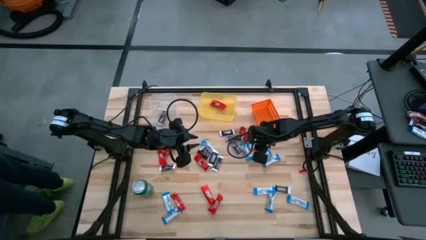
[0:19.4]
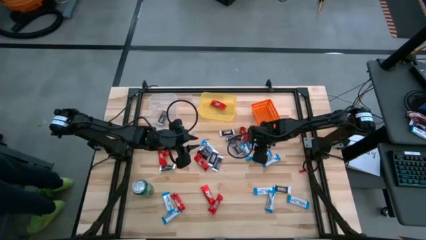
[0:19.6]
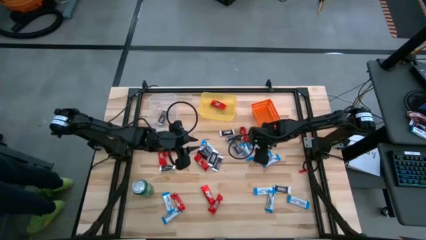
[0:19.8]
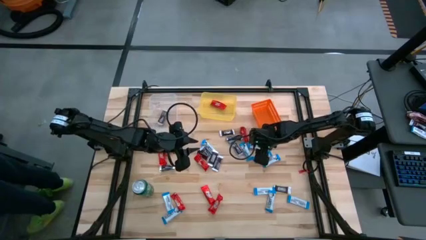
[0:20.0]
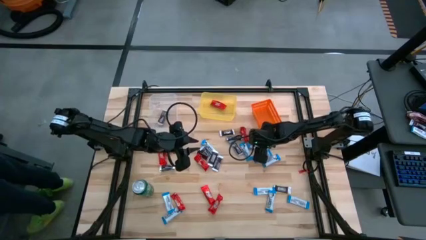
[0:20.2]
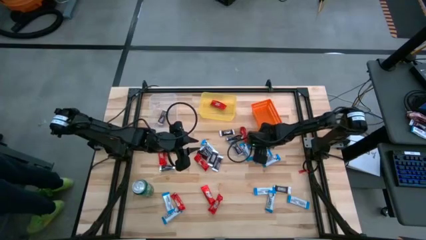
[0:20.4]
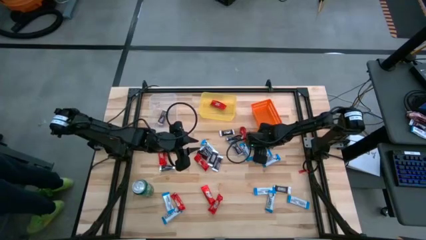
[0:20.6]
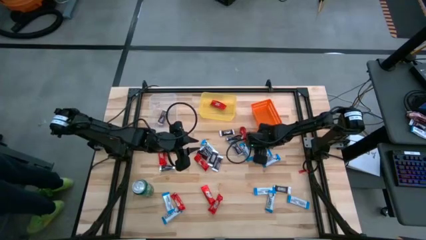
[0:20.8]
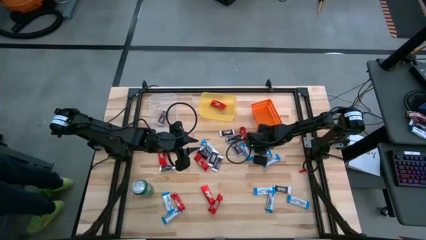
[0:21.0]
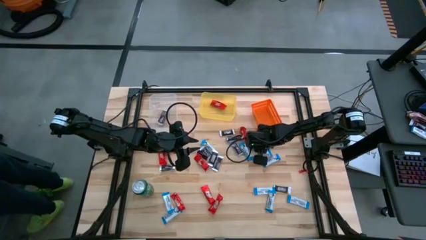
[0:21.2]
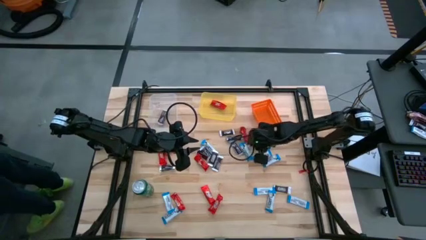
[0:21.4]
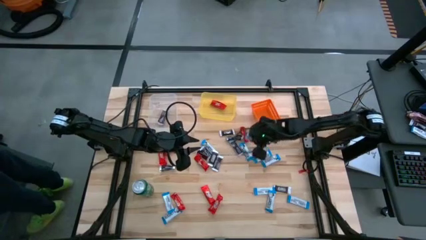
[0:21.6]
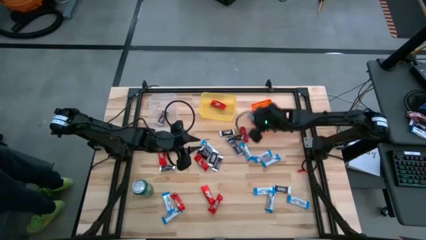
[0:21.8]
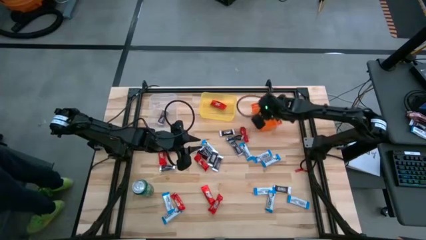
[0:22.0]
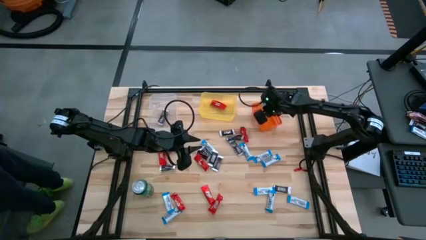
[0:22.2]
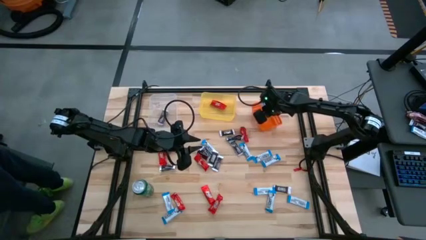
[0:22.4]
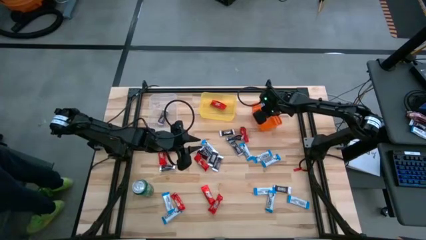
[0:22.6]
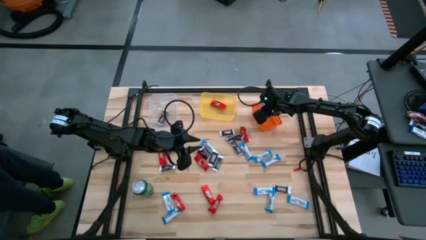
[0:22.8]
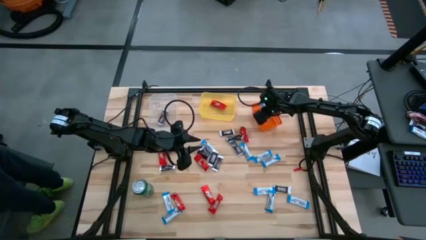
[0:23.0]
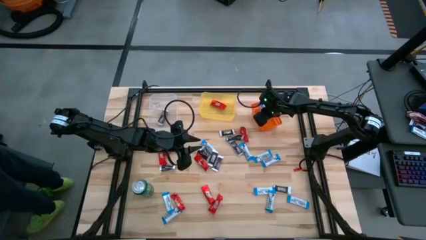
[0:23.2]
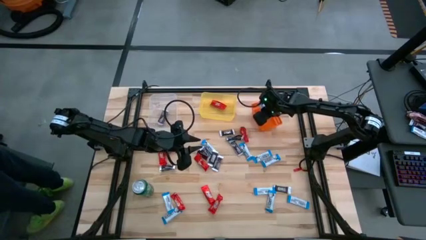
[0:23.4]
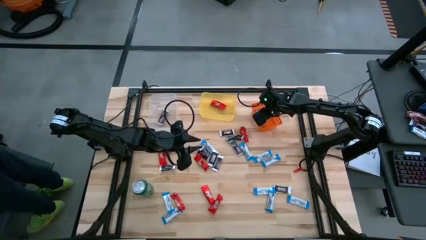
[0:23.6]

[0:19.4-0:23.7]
Task: Sort candy
Put the white chocolate bar into the orange bin

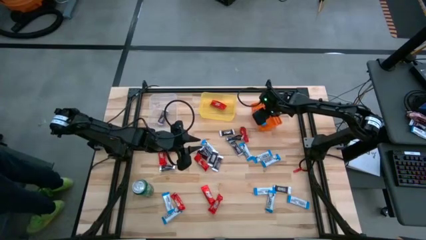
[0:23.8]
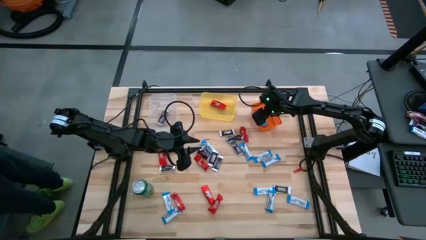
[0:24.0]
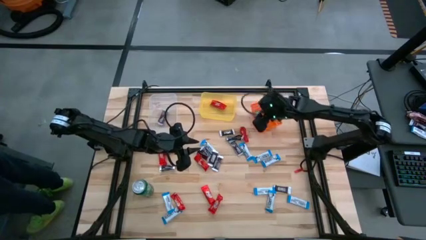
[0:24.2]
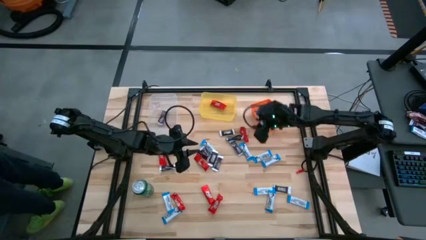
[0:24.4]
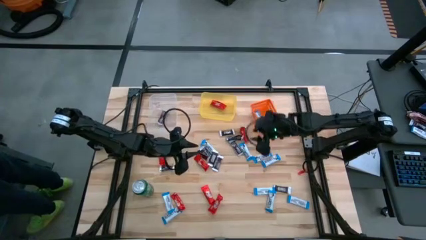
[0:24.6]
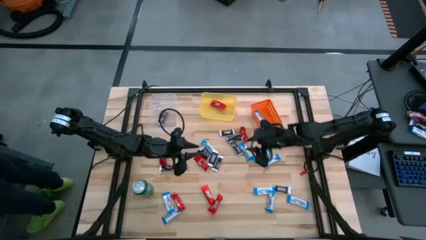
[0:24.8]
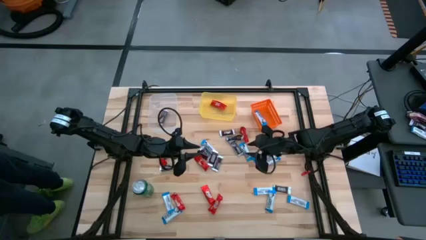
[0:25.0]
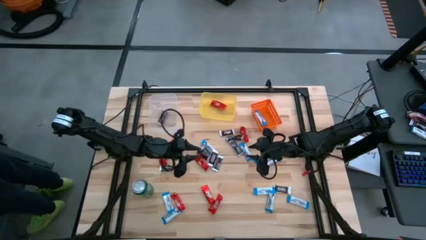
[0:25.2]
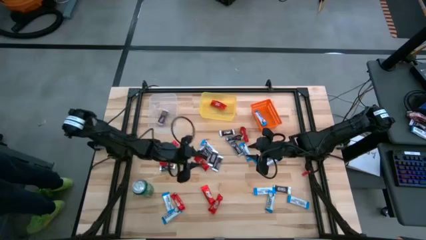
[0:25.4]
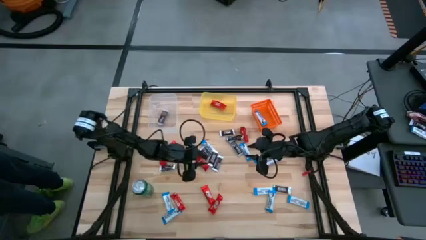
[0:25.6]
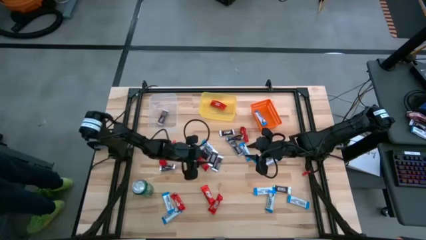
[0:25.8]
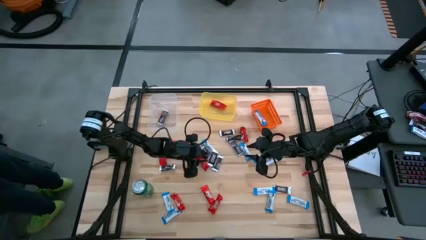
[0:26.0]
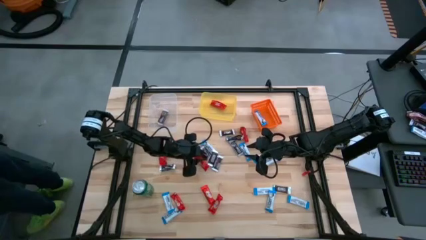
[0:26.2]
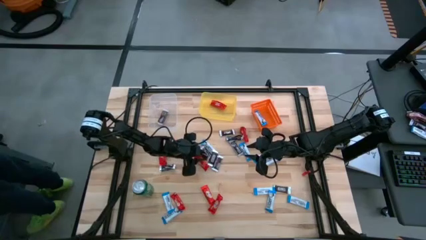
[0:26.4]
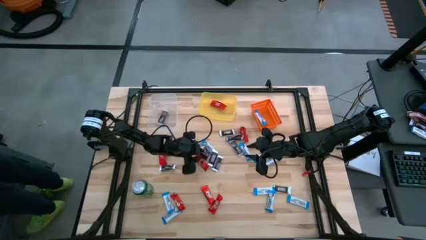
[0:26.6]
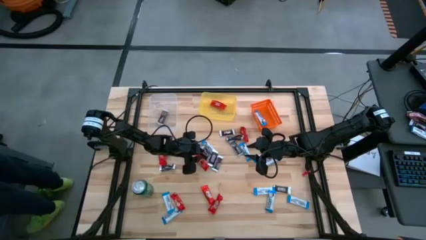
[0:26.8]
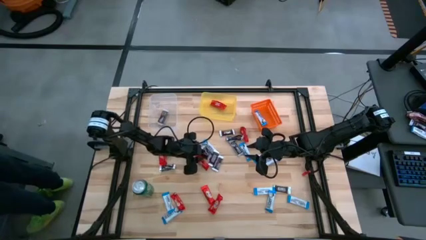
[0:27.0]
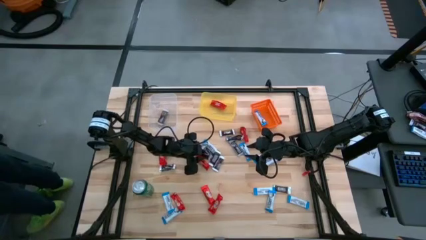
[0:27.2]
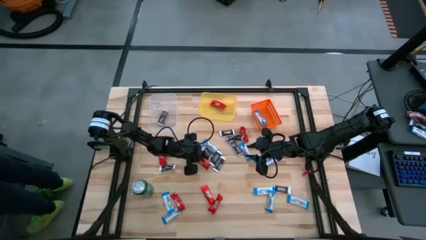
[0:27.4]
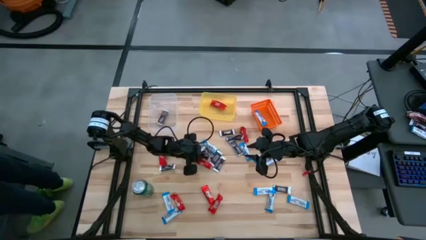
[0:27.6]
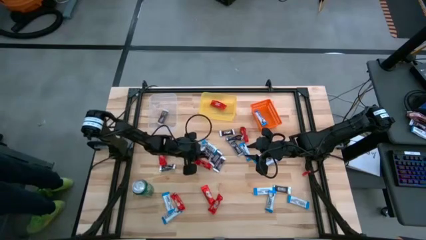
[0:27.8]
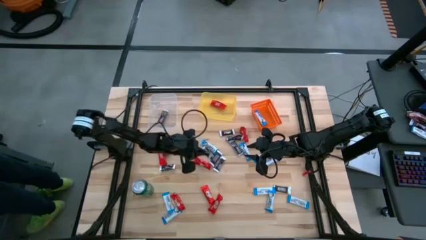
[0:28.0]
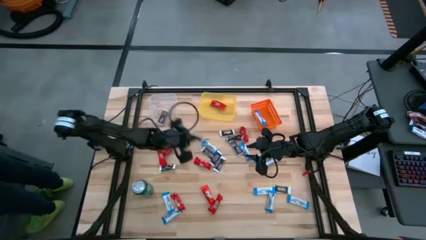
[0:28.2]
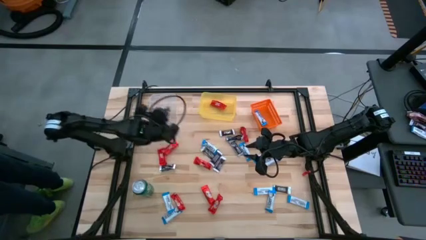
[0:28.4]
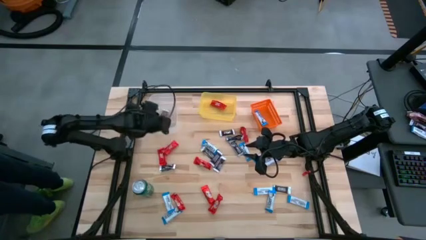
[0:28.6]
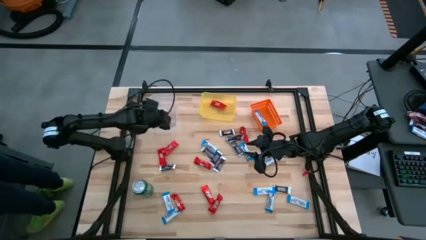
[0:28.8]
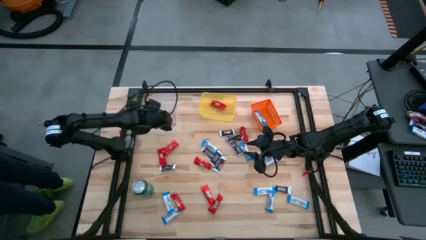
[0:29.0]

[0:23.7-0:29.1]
Put the brown chocolate bar into the transparent bin

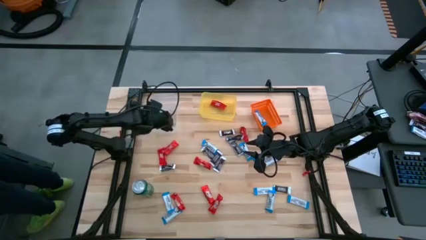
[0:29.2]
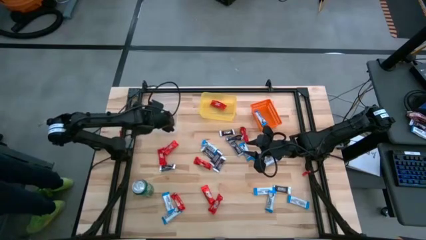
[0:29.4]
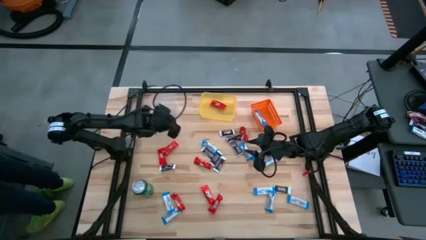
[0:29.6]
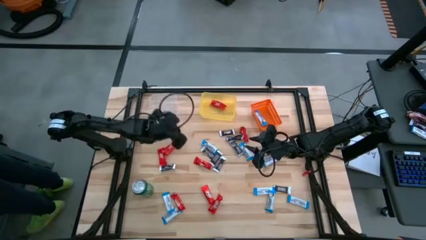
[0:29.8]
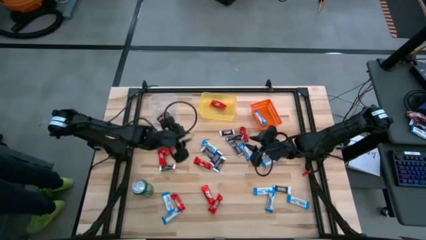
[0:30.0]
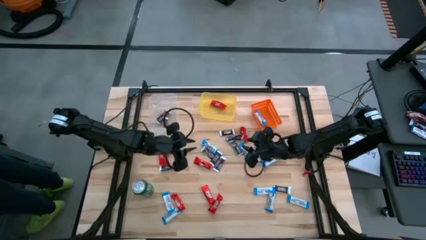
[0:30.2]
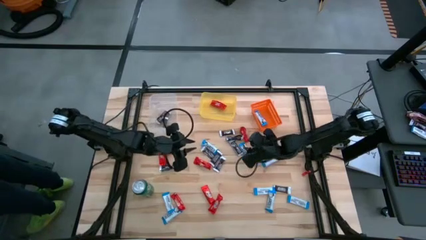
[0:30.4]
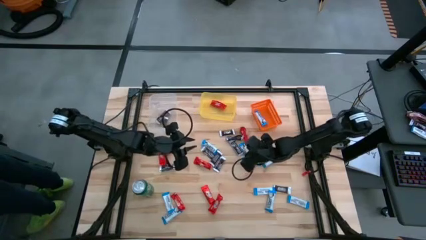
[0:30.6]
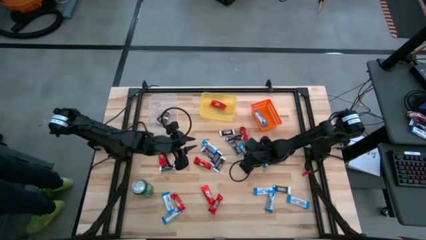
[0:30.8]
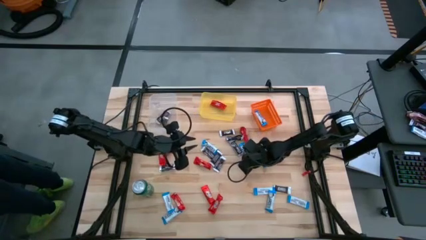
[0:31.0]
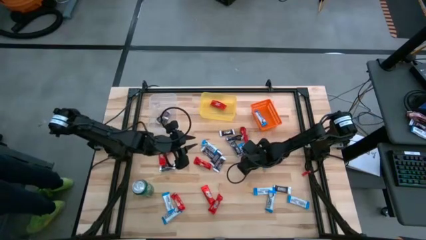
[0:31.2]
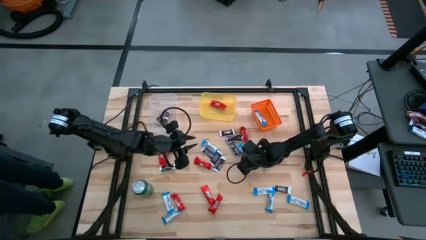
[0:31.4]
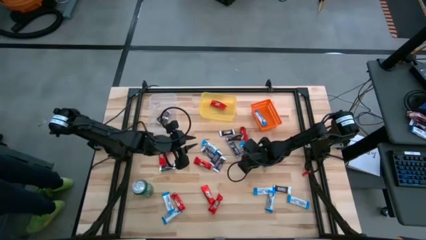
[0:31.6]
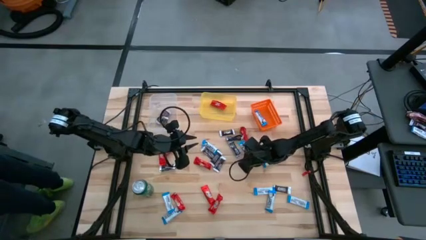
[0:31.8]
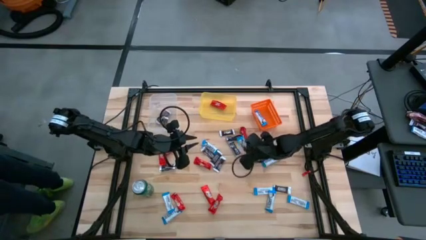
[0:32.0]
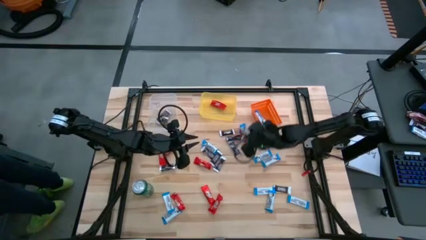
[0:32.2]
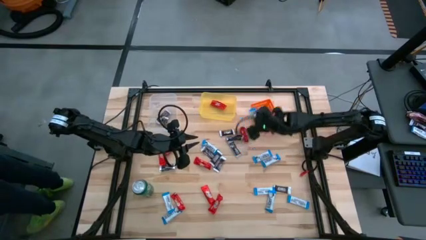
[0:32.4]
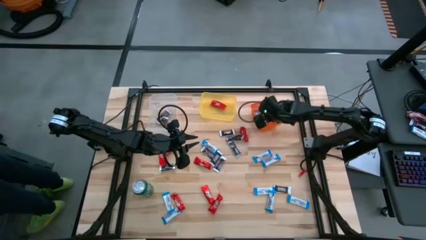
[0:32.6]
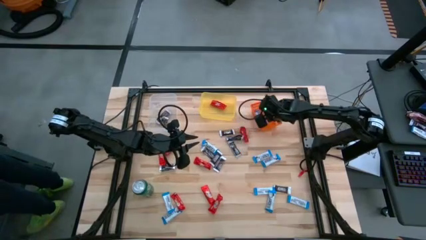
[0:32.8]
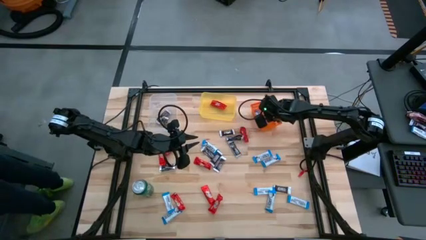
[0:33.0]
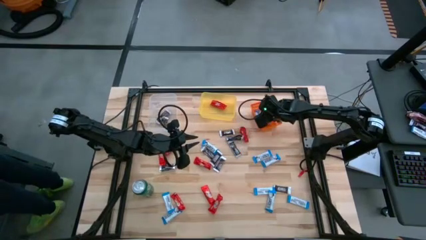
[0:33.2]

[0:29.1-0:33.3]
Put the white chocolate bar into the orange bin

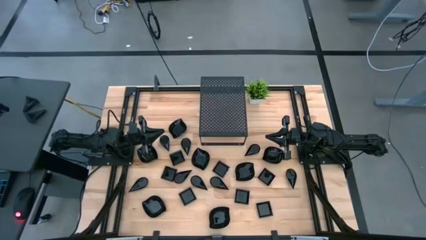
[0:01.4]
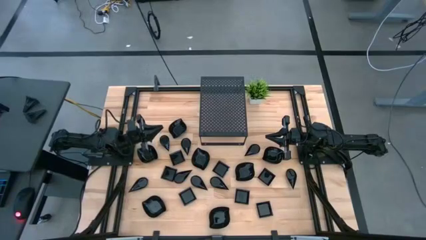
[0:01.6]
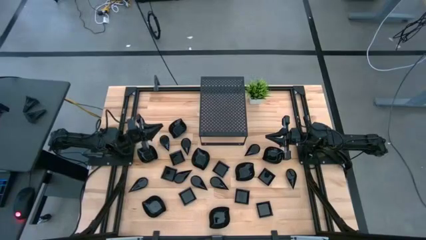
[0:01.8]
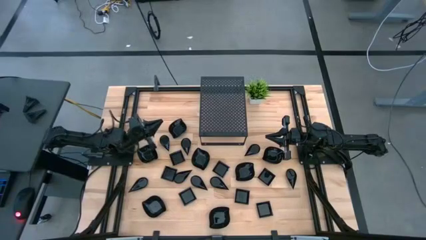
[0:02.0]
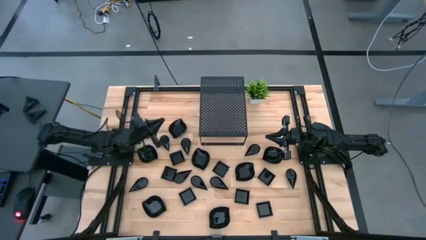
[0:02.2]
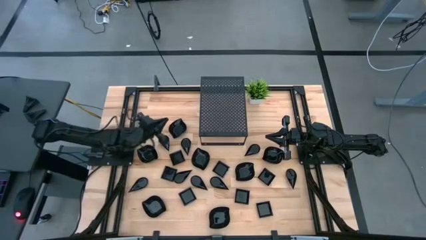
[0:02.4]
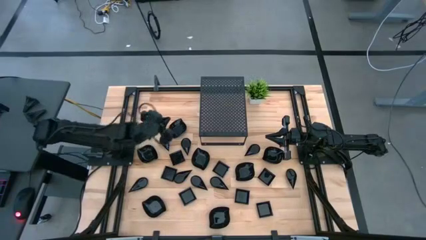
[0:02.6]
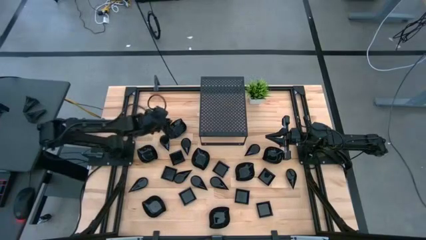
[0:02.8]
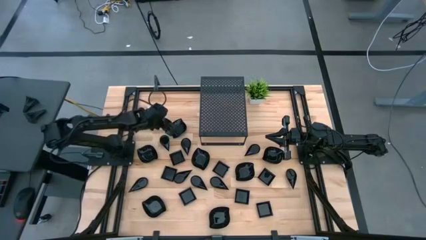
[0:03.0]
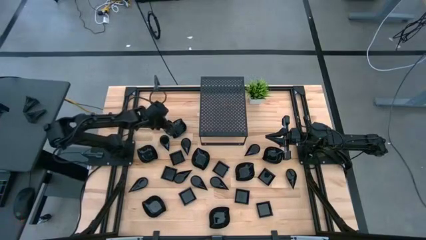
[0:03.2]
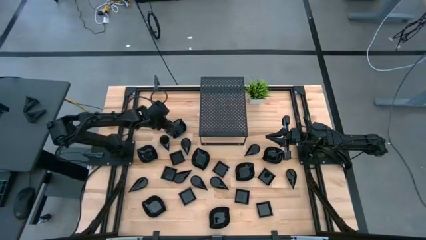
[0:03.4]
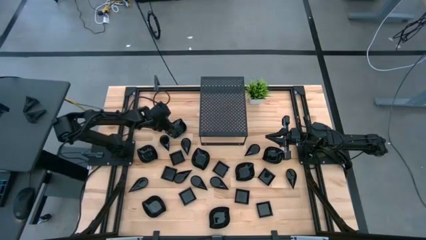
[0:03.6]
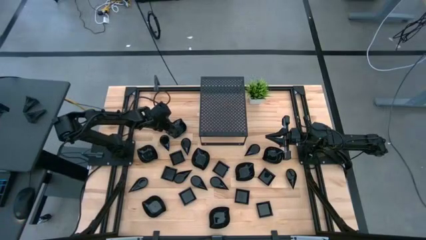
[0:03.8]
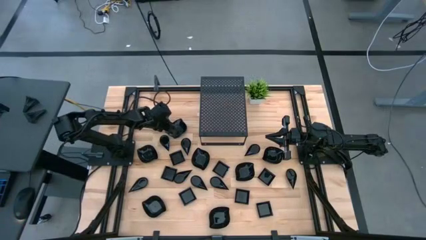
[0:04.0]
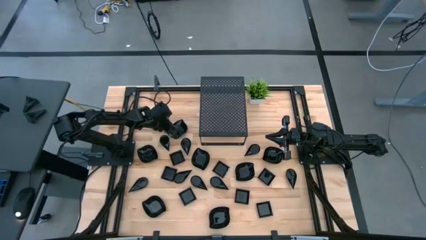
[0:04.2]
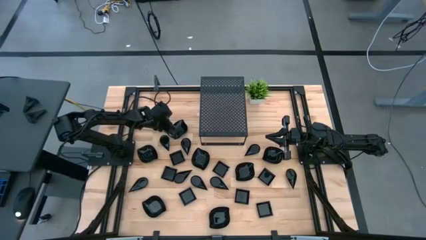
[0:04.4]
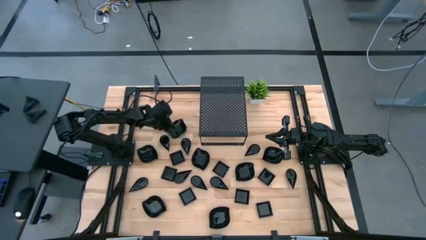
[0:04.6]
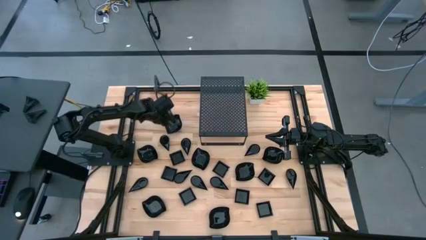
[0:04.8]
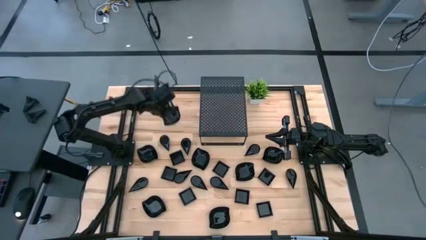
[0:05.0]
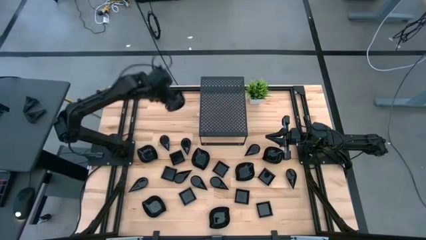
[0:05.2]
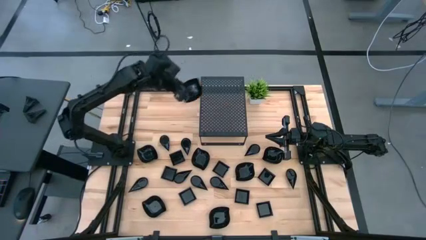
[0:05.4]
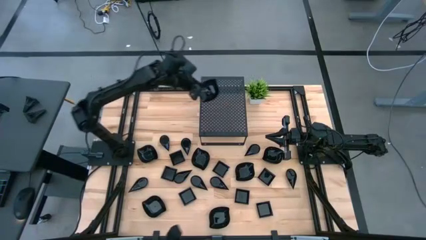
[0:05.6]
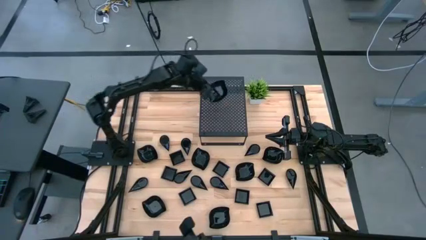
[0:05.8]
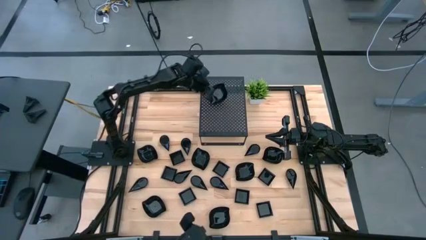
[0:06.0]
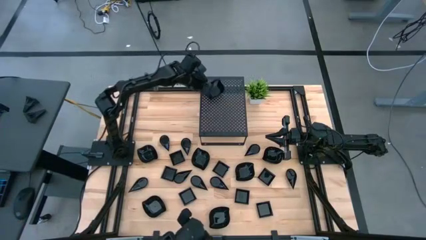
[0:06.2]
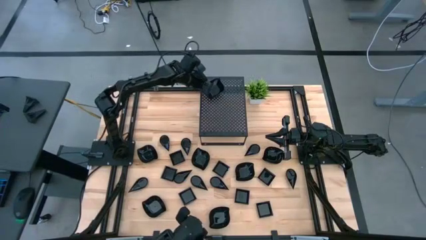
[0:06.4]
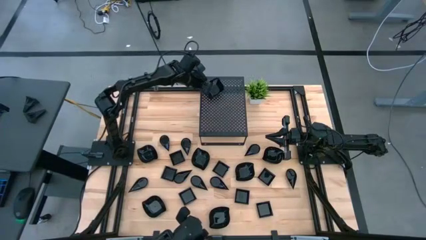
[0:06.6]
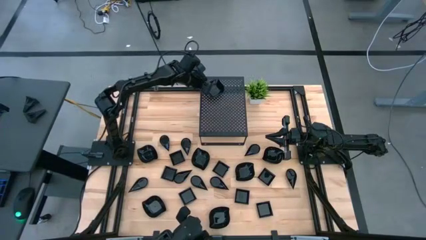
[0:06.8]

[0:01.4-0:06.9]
Task: Pick & Place Mini shaped plates
Put the black leaf-shaped plate on the shelf
